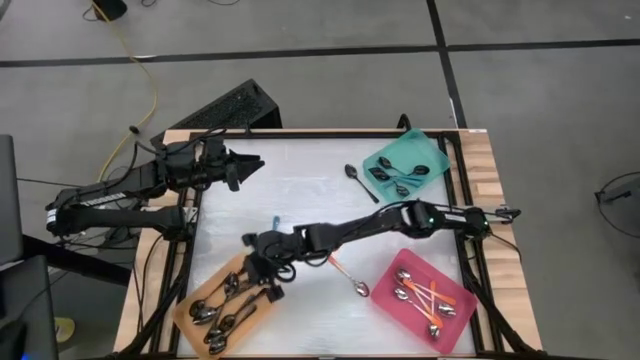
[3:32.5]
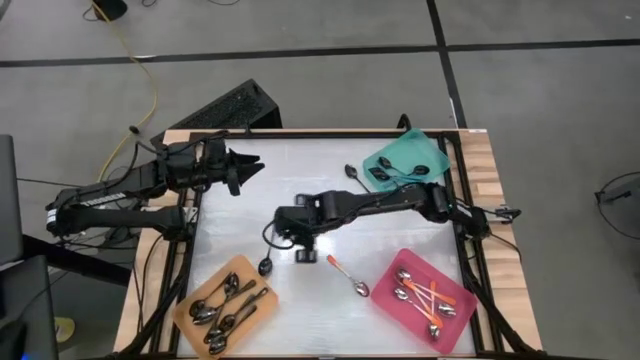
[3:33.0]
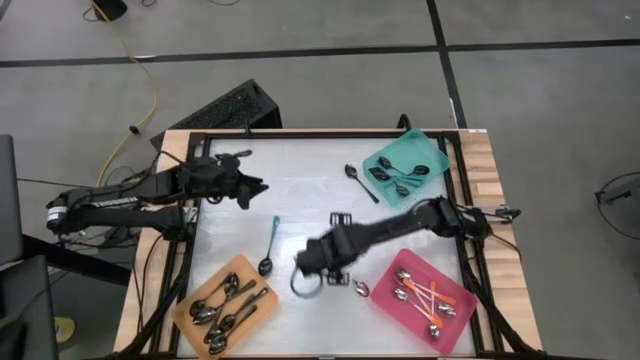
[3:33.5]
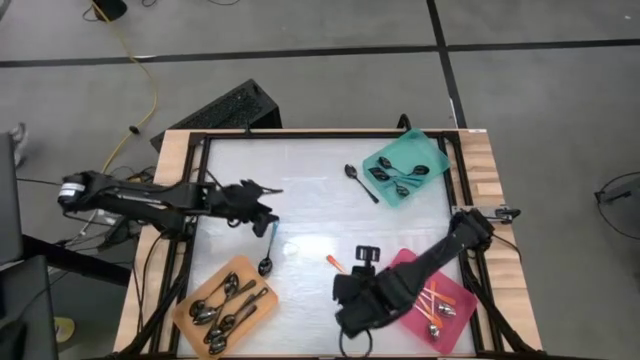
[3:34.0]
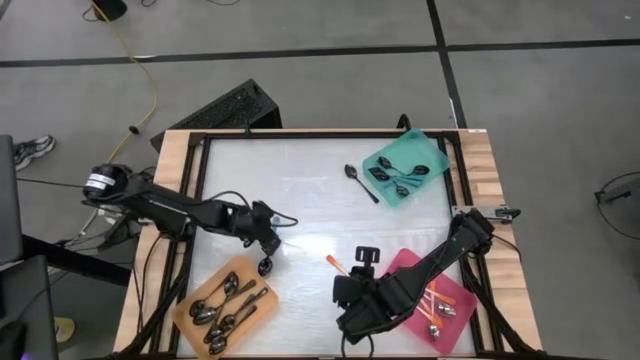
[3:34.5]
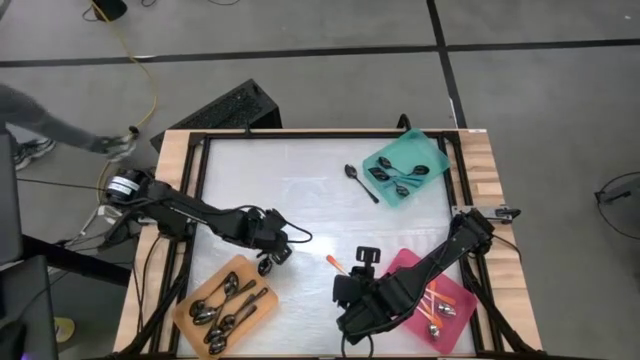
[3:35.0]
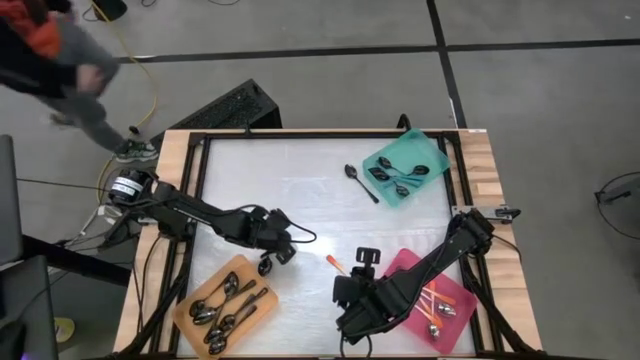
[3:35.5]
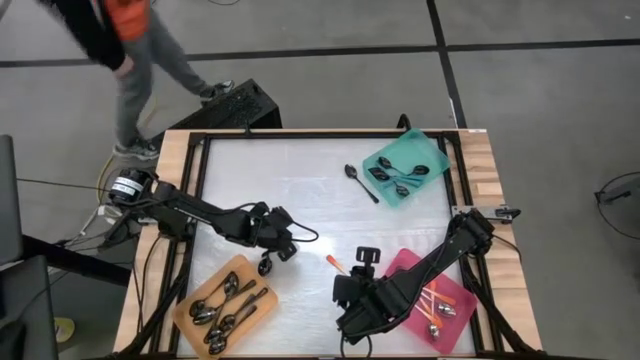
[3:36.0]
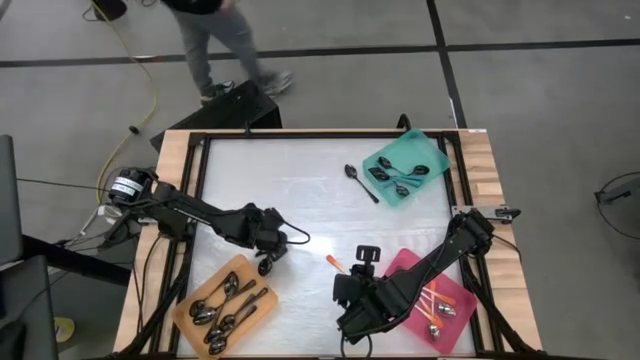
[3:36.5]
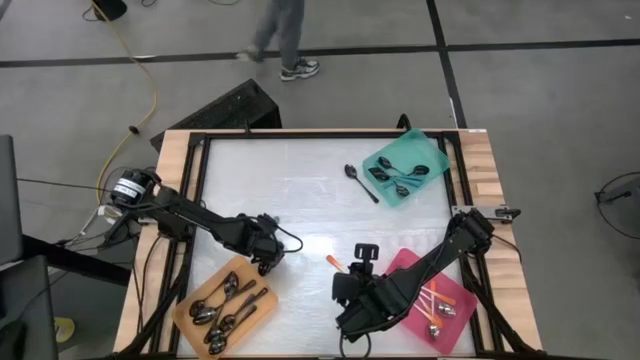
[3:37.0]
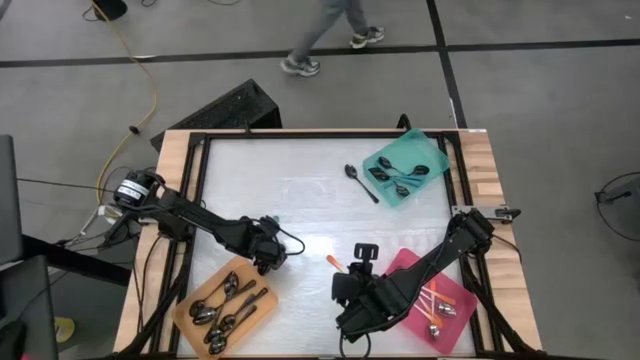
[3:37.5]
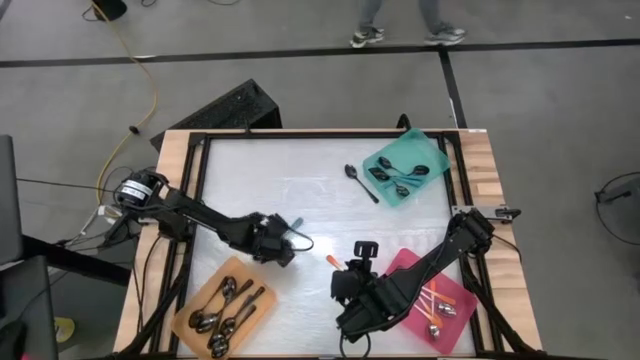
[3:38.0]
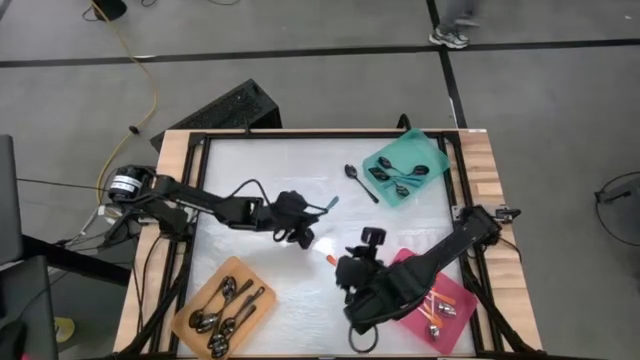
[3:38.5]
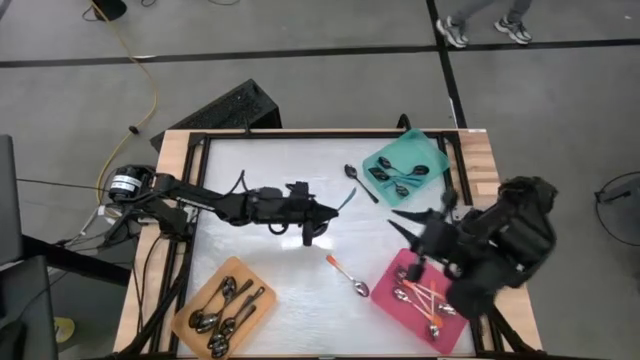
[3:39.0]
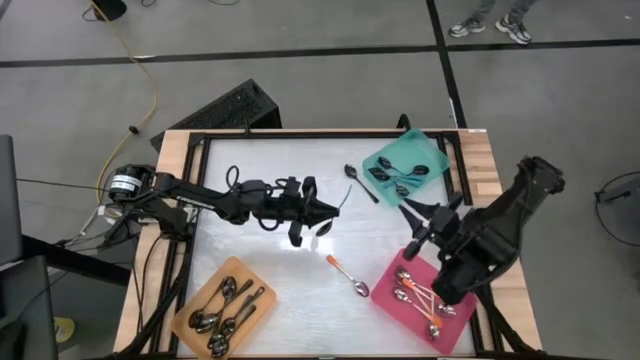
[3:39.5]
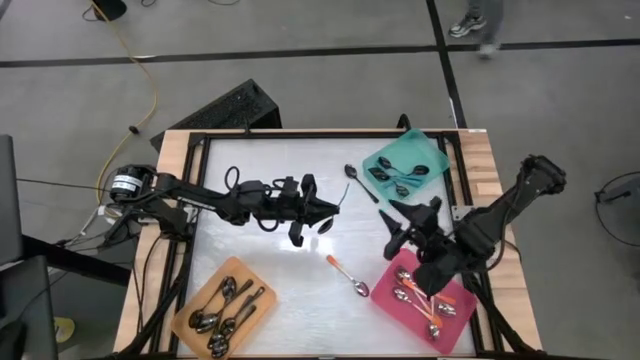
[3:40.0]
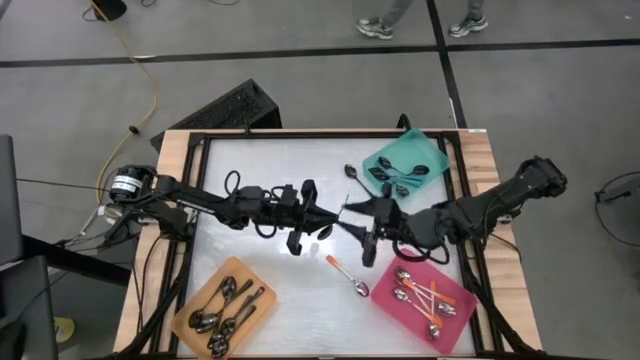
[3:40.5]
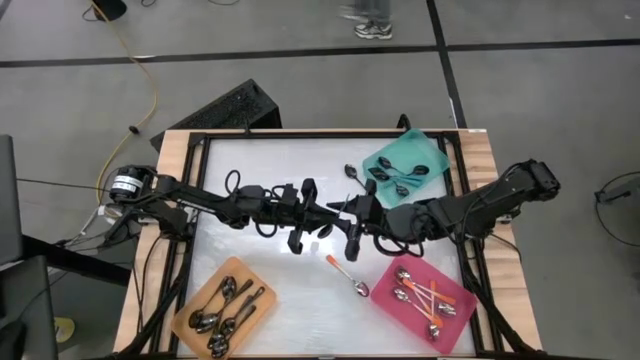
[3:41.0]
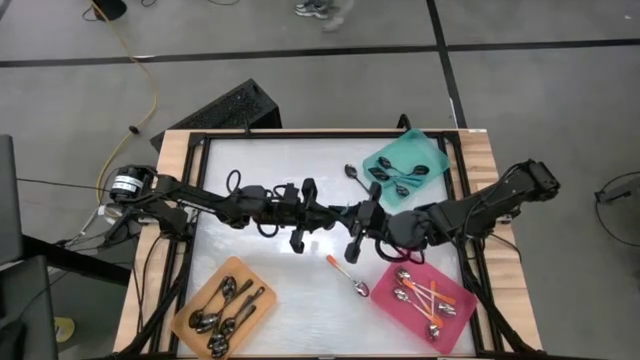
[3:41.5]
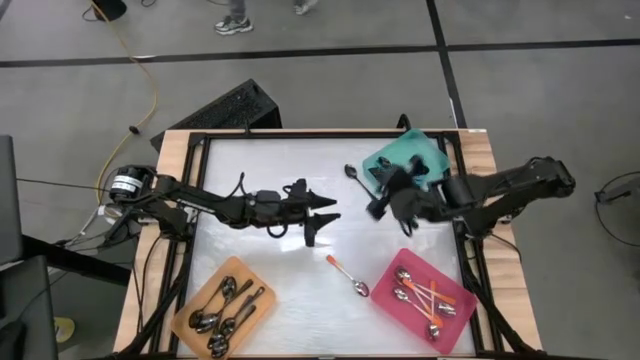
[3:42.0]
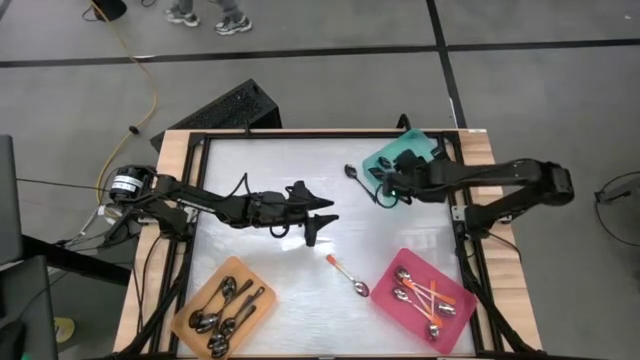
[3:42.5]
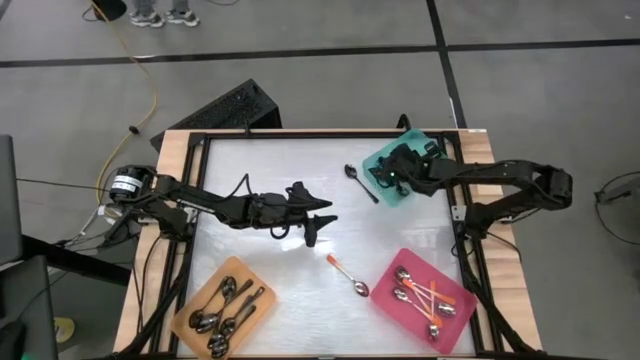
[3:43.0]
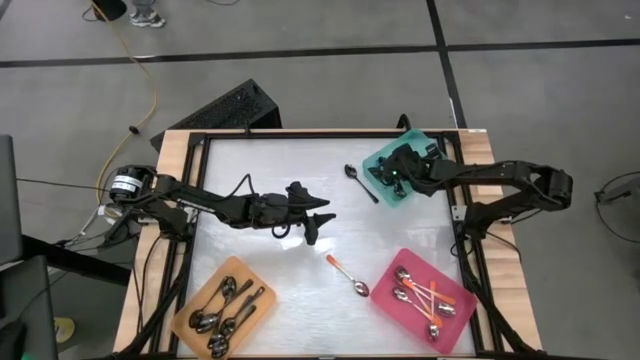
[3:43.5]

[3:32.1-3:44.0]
Task: Sort silverware by color (type)
Put the blue spoon into the blue bin

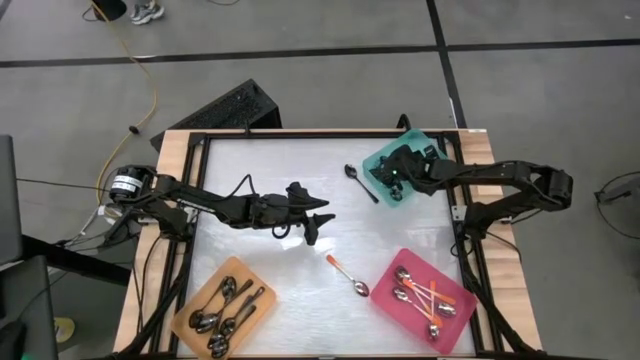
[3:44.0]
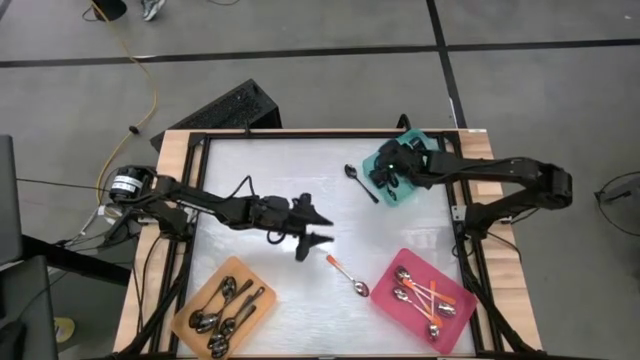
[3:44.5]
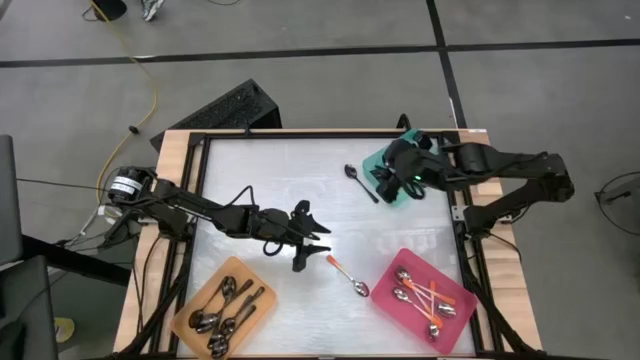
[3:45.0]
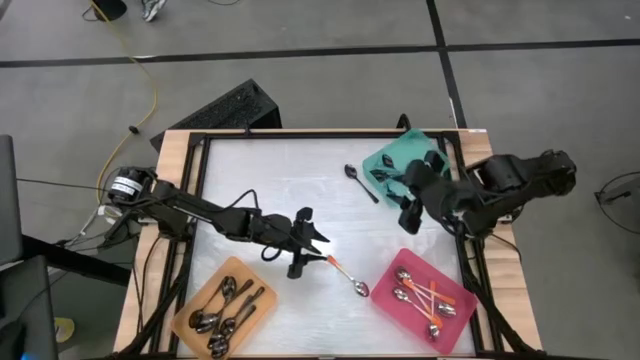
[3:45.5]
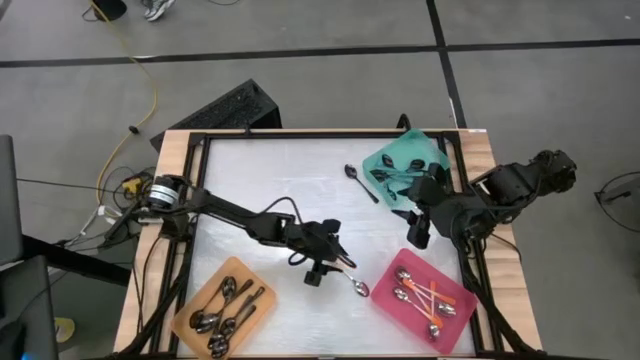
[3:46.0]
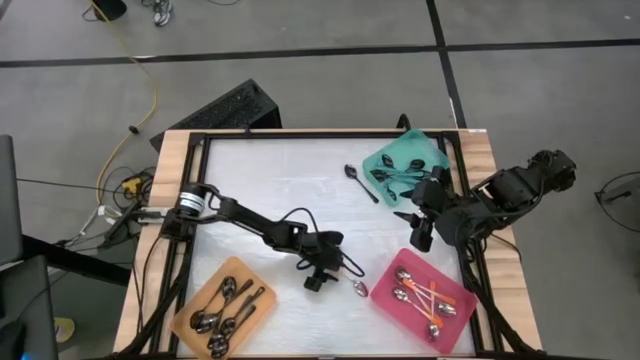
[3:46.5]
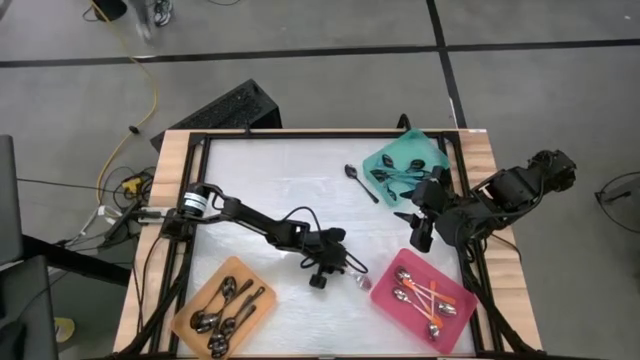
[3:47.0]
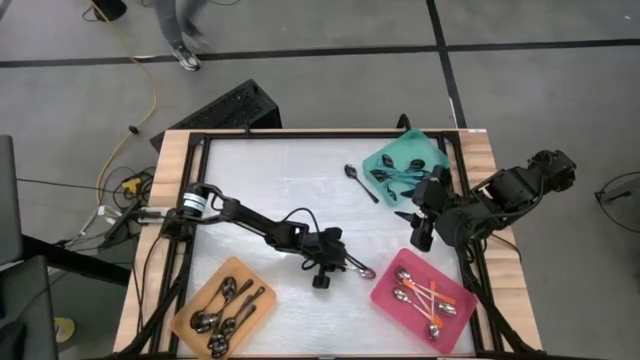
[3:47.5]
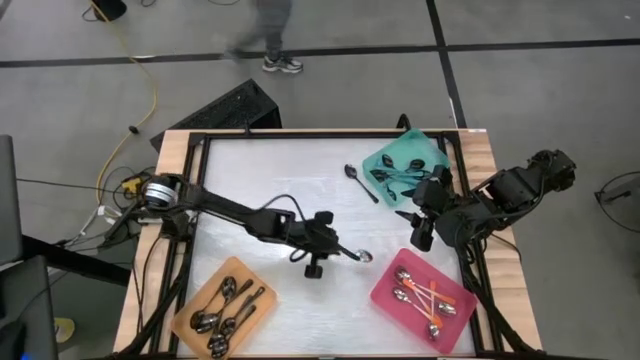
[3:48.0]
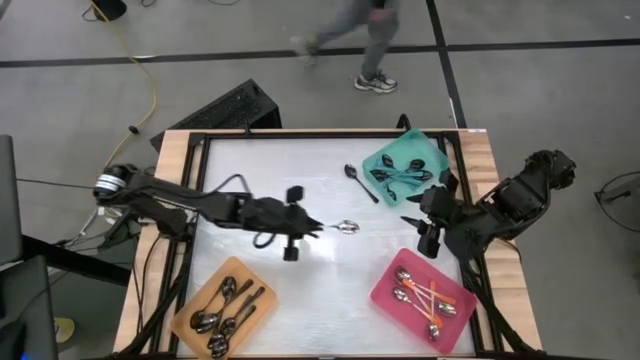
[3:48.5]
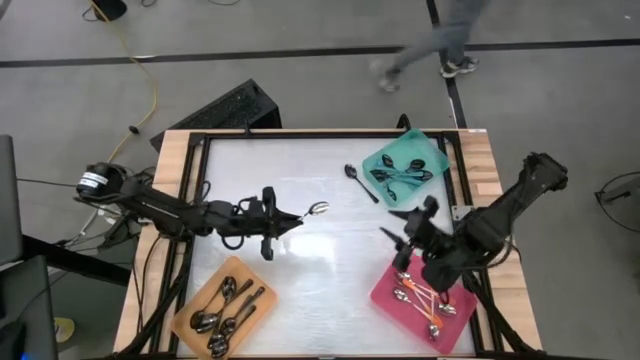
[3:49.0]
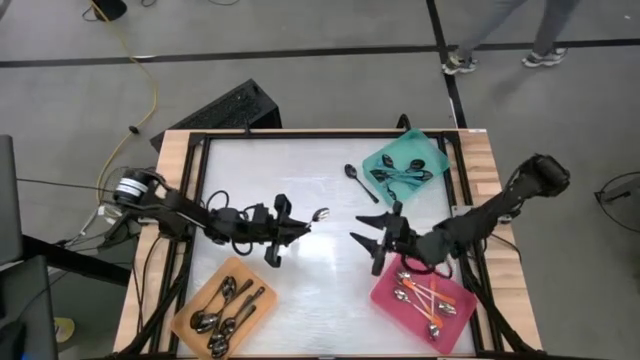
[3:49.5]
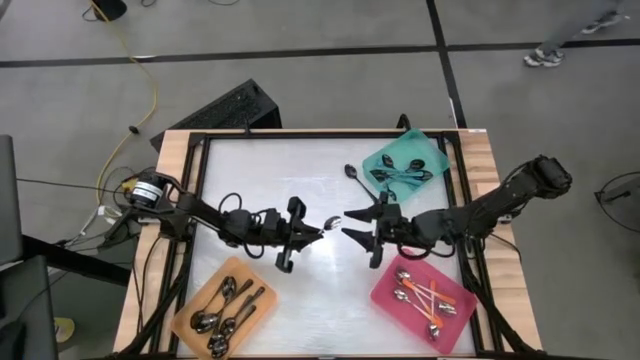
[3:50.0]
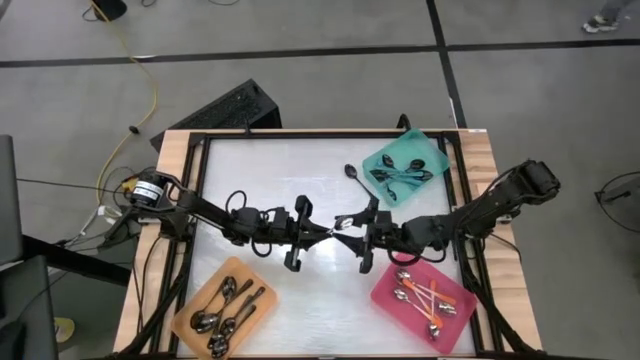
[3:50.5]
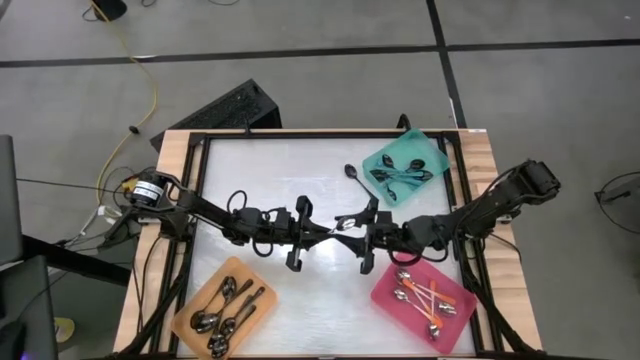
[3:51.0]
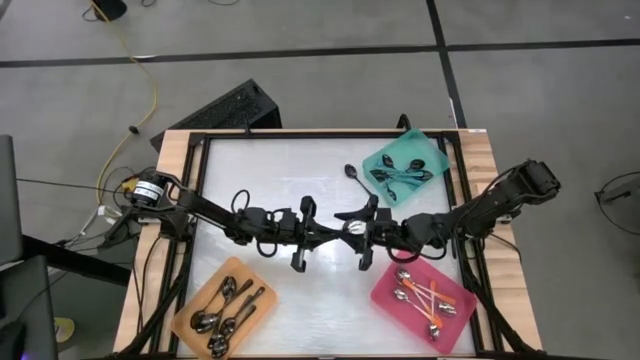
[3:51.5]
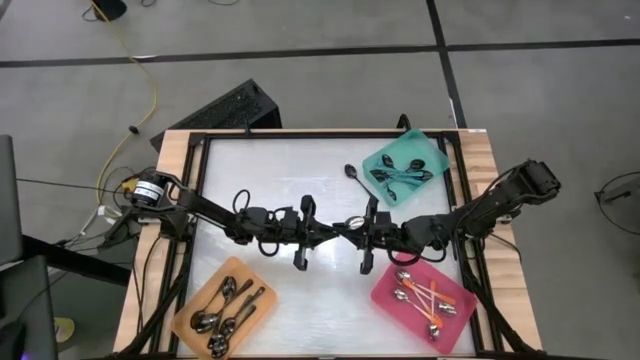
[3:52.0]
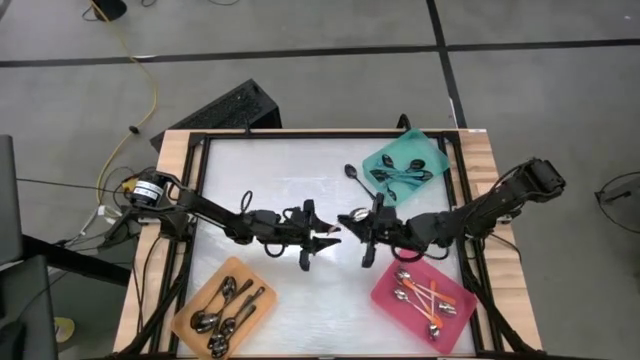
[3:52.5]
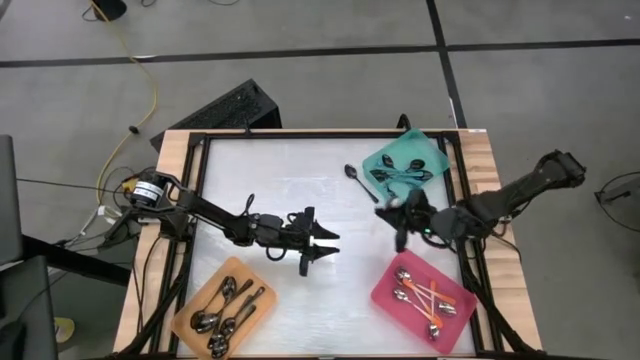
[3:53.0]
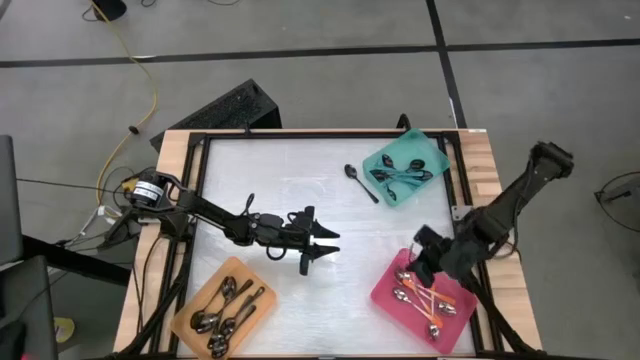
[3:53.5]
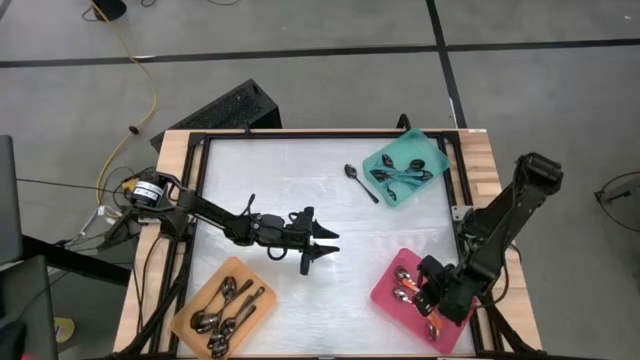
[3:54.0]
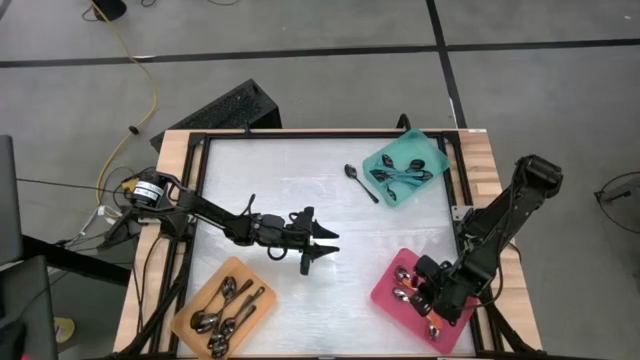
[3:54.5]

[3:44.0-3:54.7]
Put the orange spoon into the red bin
